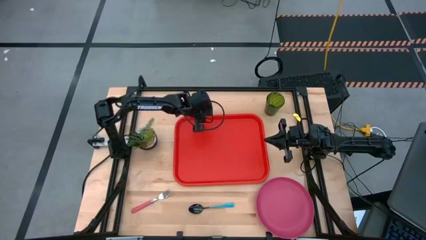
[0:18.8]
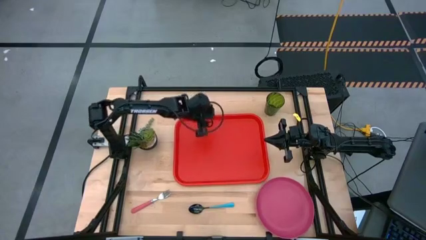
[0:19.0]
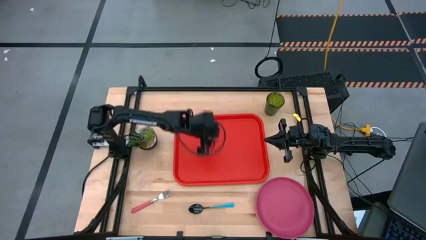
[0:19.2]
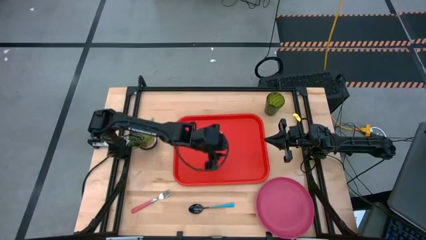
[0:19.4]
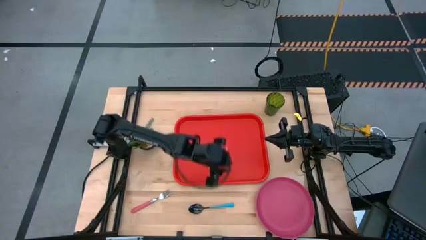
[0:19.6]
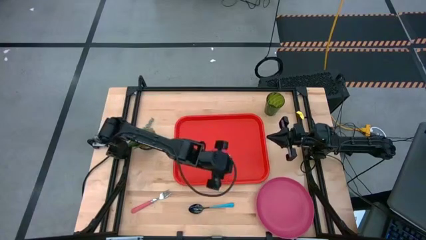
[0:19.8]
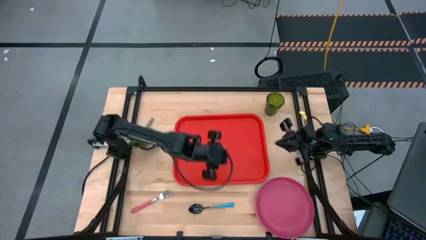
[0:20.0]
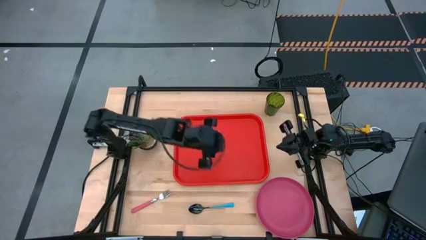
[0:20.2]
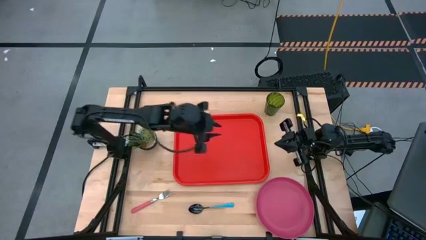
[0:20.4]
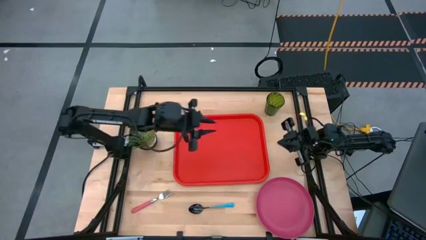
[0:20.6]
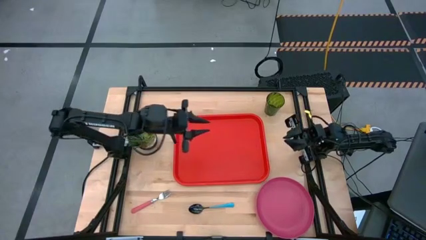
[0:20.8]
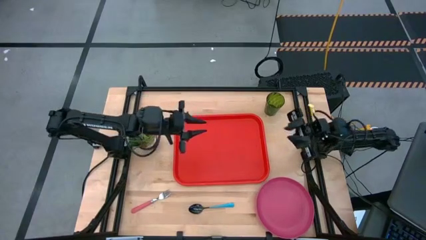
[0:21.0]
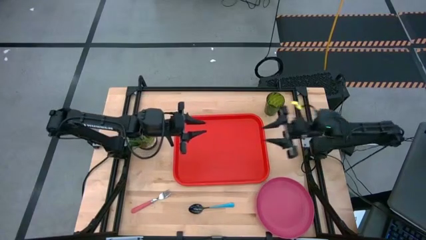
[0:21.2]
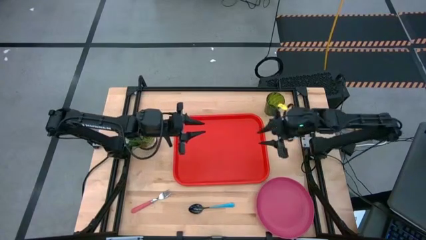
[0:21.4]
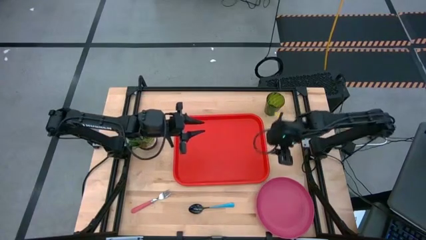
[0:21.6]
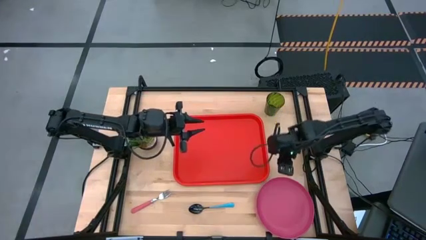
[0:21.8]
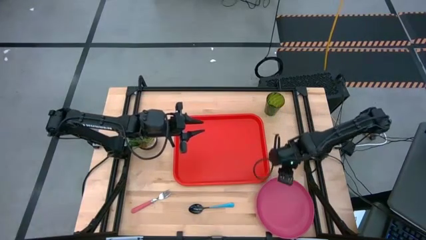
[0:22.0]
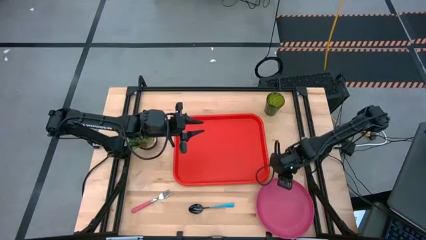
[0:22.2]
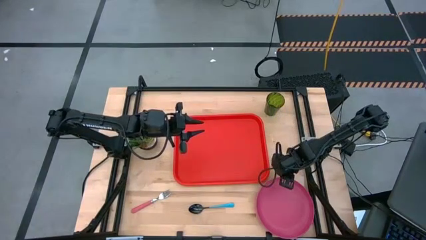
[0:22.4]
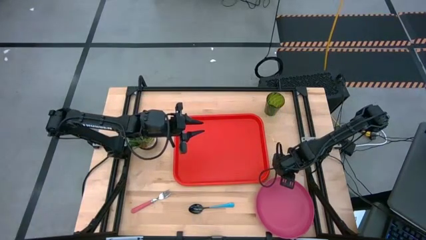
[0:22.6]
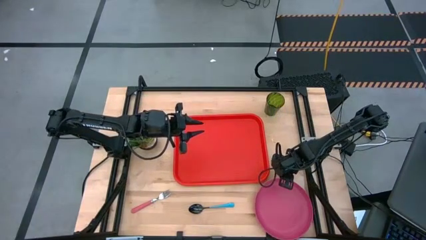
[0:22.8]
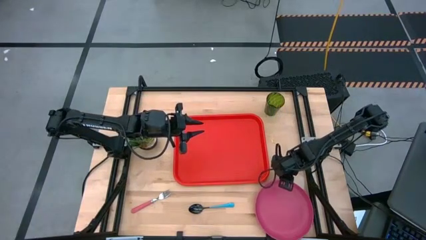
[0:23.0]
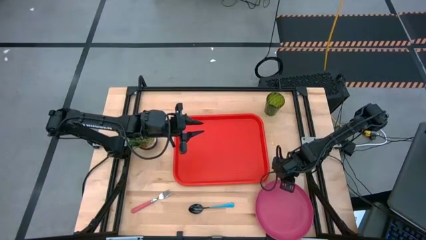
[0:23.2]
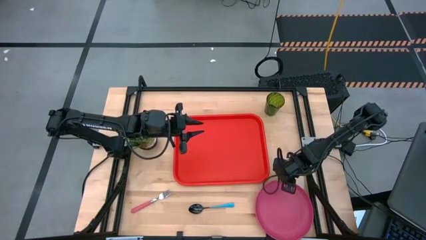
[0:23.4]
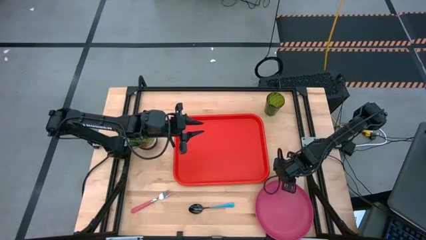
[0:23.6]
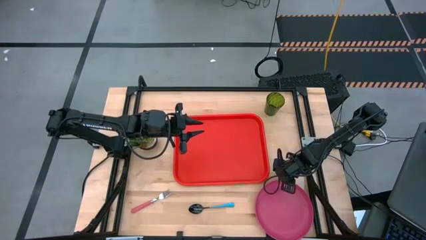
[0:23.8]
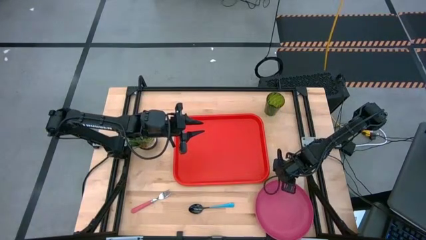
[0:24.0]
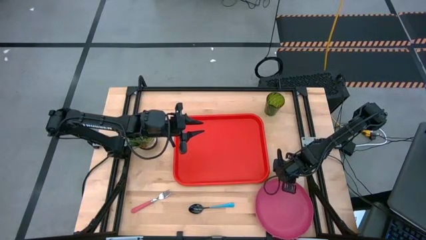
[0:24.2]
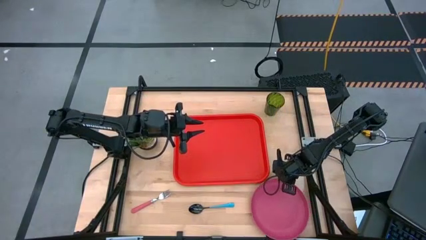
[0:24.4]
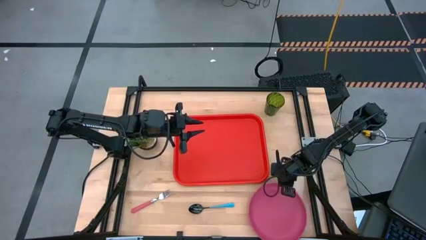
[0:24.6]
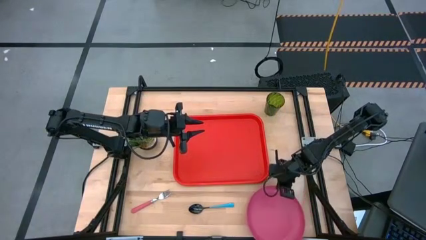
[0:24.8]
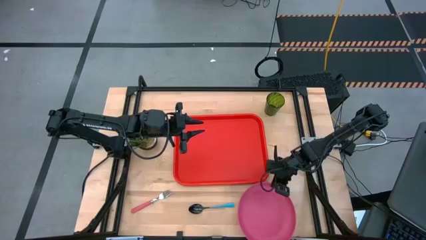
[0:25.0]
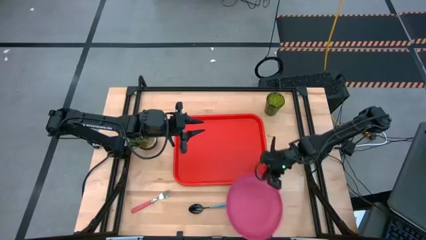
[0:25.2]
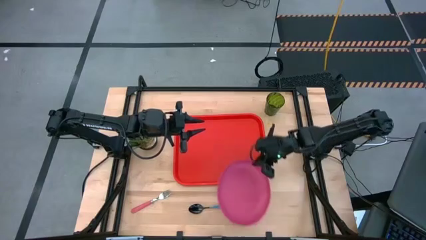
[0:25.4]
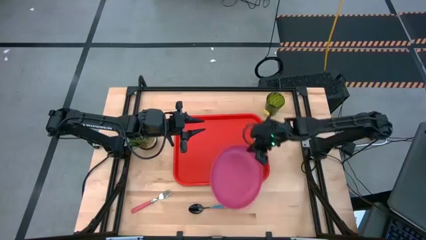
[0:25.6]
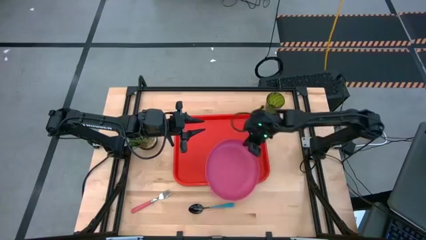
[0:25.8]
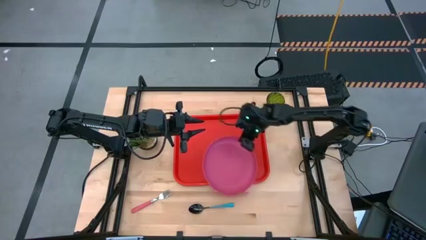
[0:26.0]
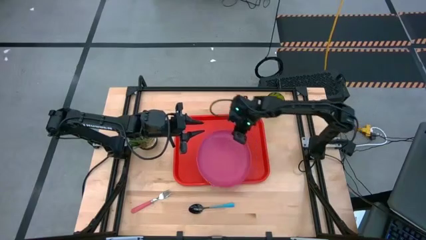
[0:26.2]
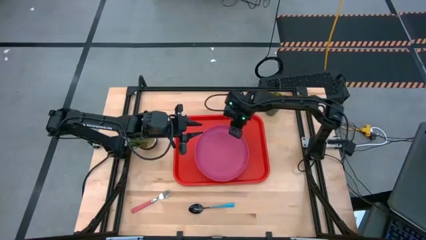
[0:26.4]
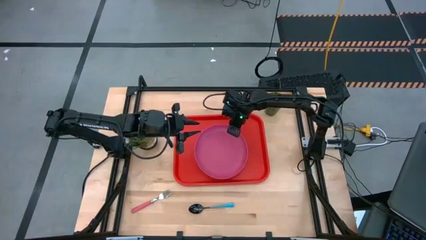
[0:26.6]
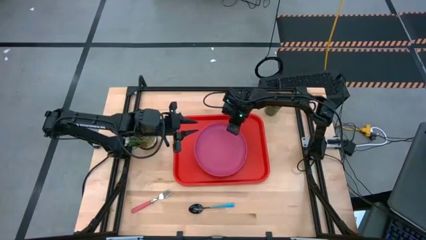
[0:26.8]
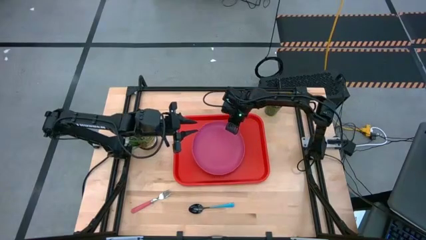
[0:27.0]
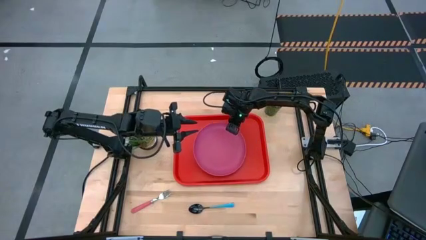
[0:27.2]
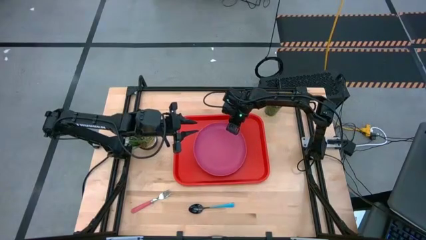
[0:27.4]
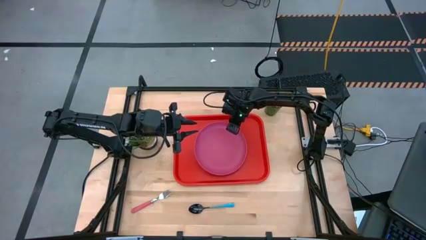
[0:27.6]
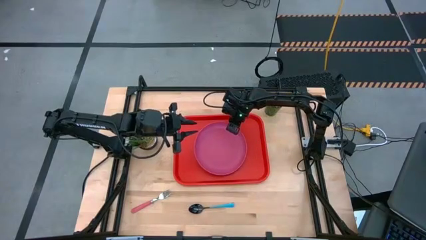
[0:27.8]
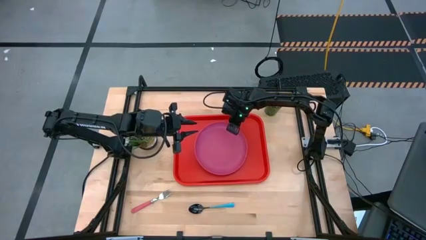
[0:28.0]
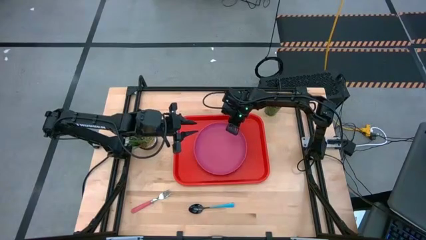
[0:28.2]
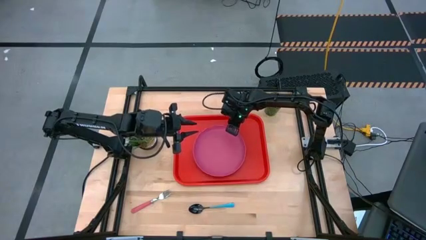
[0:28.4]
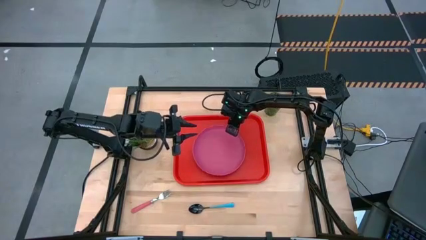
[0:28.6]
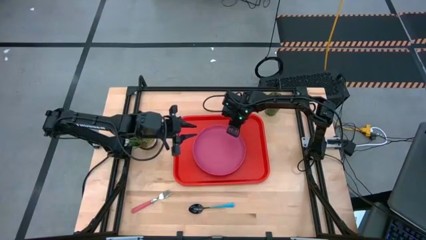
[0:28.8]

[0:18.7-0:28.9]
Task: Pick and place plate/cup/fork/spoon on tray
Put the pink plate on the red tray

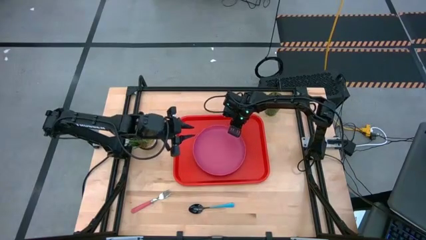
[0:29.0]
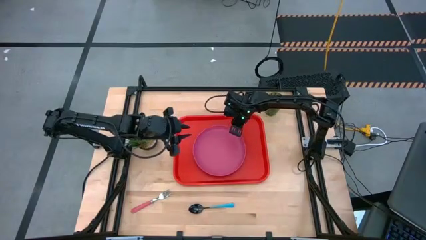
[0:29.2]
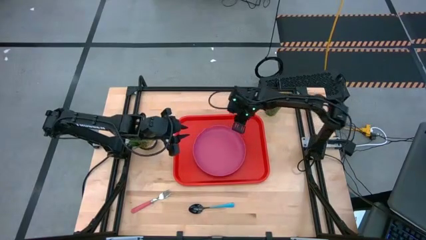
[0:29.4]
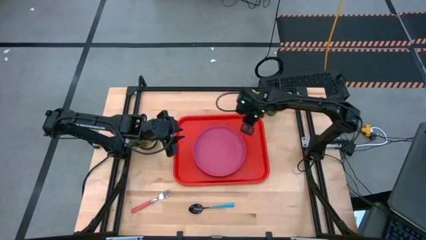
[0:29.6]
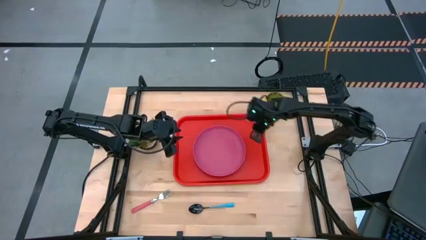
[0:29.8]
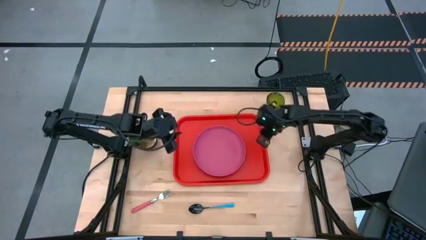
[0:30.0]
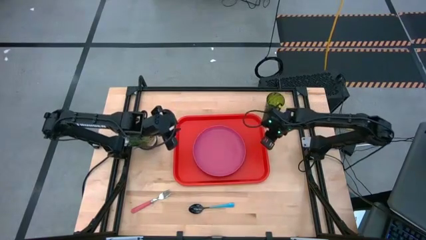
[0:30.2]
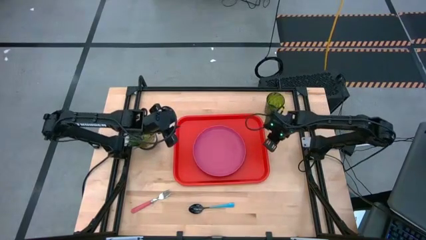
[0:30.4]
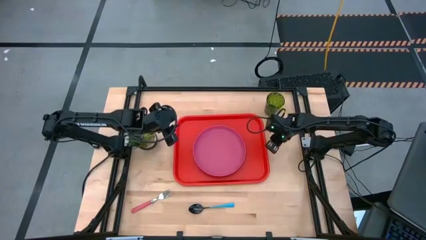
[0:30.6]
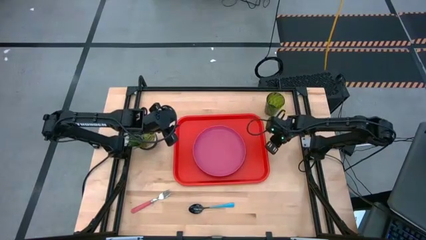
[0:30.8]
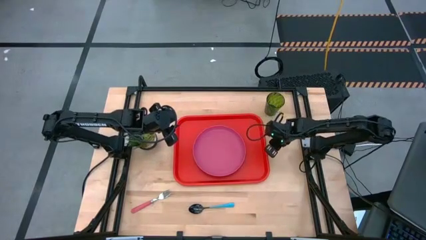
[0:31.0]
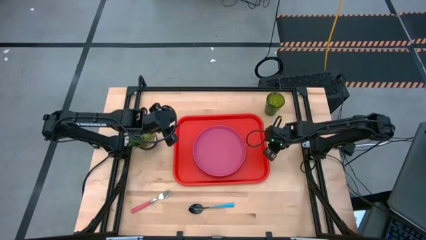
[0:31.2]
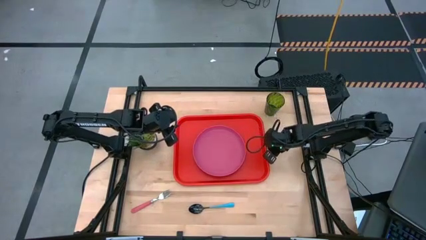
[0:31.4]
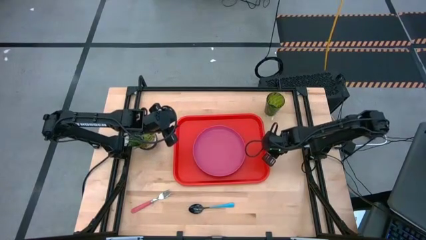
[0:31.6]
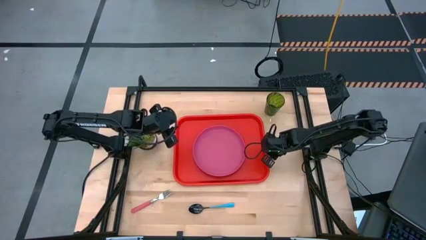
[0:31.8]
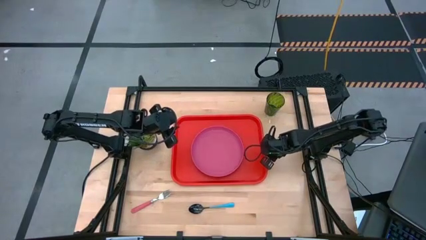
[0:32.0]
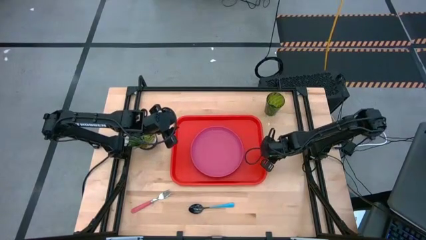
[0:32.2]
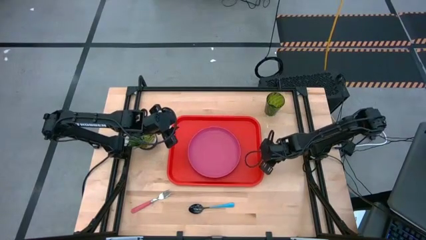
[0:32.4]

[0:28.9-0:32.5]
Adjust the red tray

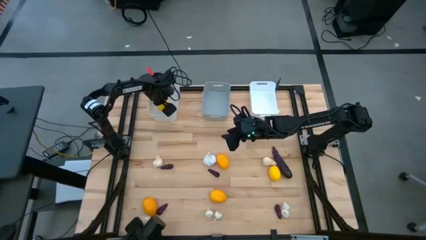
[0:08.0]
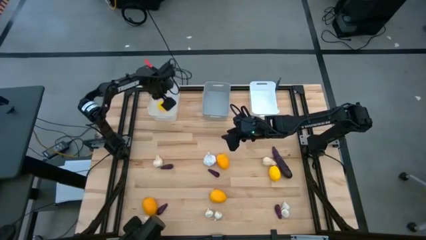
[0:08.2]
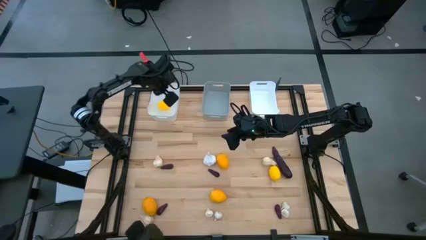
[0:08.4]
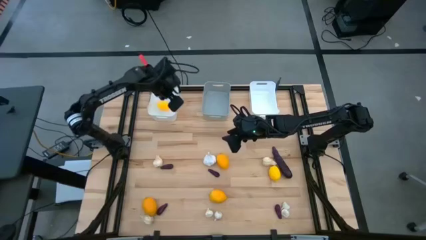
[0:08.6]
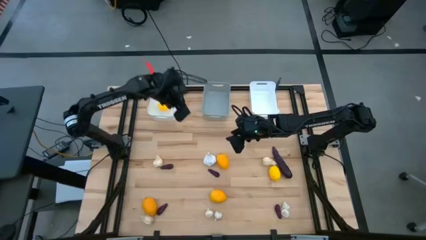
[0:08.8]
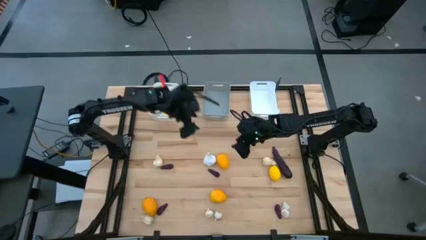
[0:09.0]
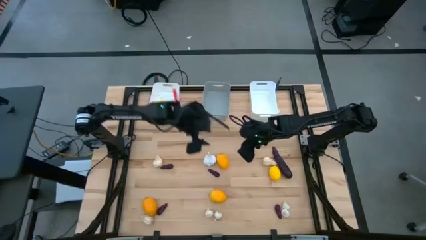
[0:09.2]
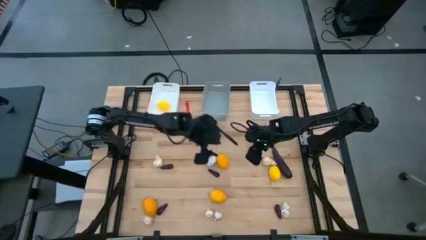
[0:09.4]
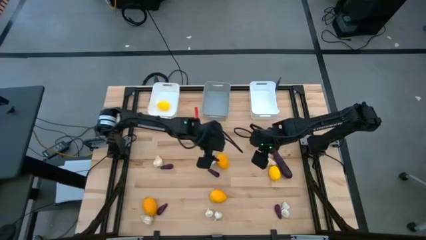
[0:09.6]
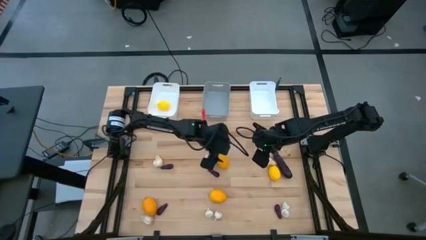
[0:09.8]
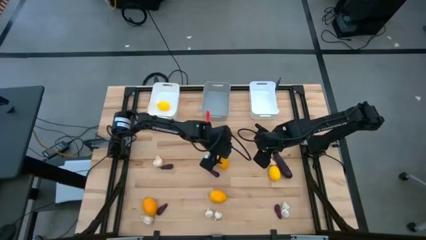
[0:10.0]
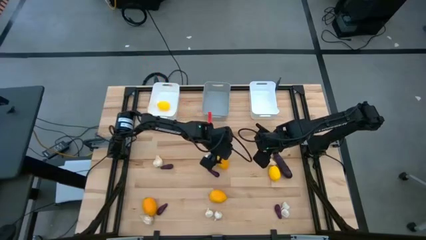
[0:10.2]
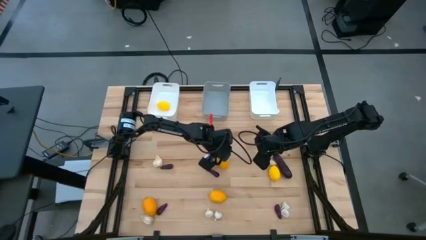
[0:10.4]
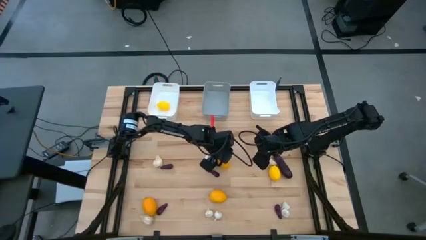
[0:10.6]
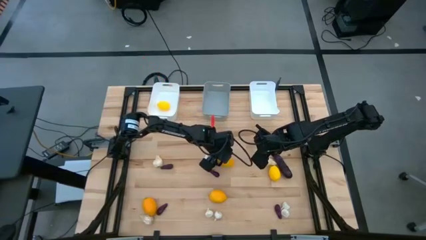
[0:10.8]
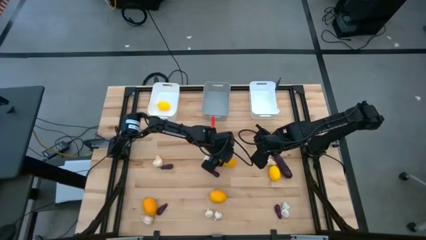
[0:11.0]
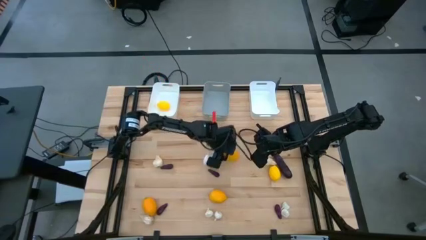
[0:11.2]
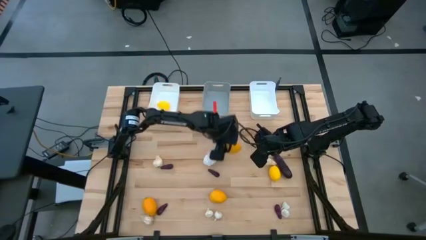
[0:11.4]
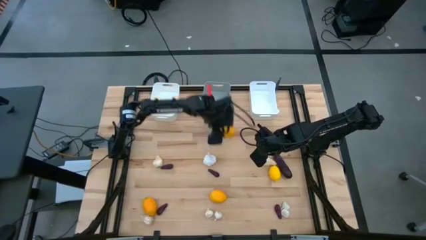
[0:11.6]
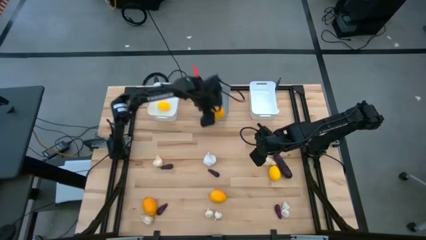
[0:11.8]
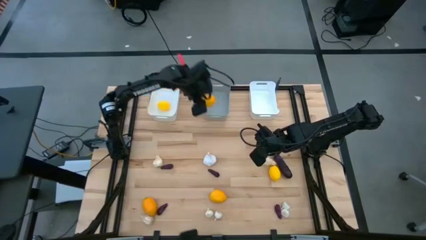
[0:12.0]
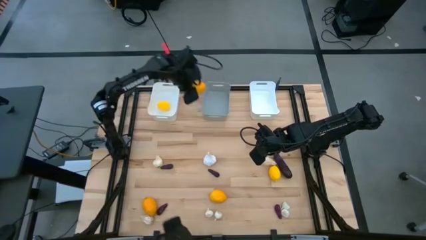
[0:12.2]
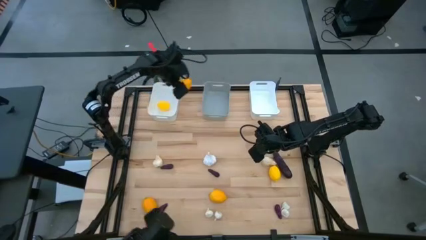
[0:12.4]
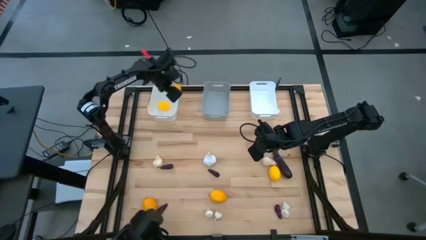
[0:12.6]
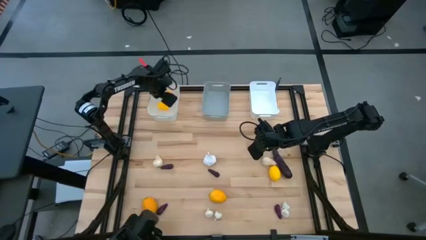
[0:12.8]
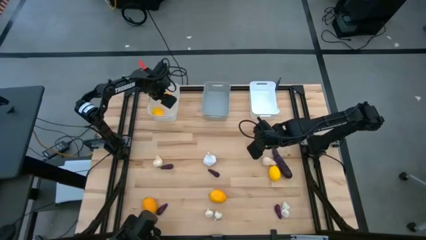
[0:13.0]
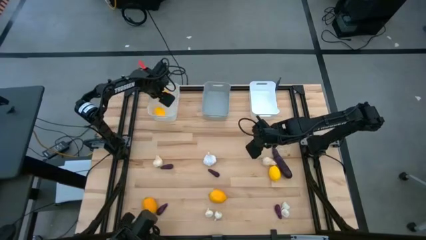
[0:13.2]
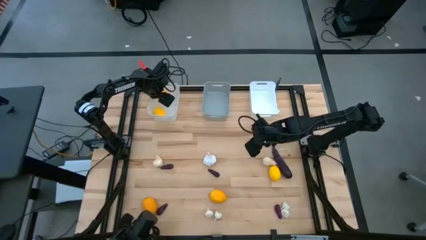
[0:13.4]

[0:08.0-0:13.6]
Task: Sort produce into baskets
Put the lemon into the left white bin
